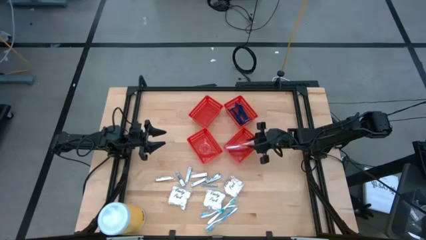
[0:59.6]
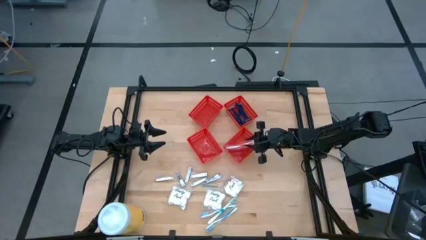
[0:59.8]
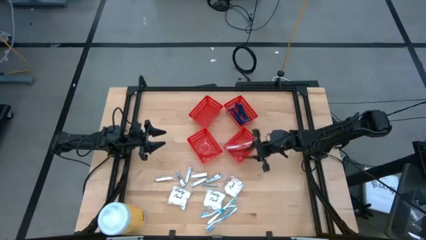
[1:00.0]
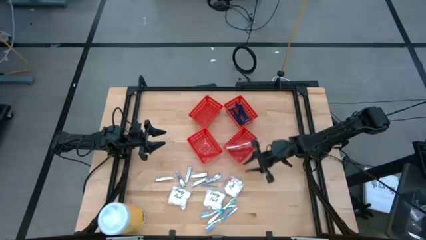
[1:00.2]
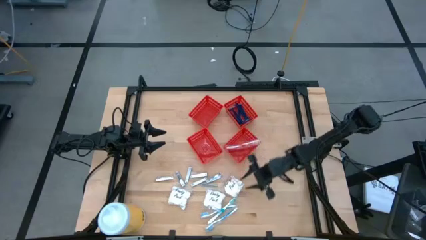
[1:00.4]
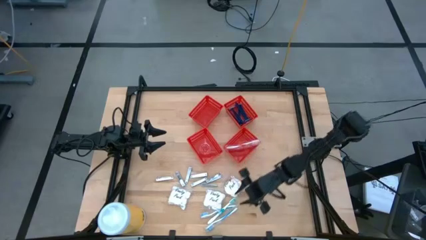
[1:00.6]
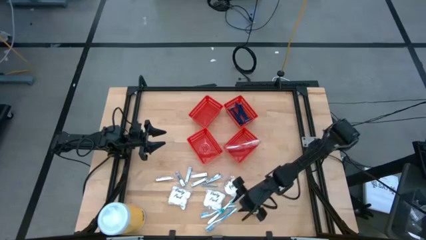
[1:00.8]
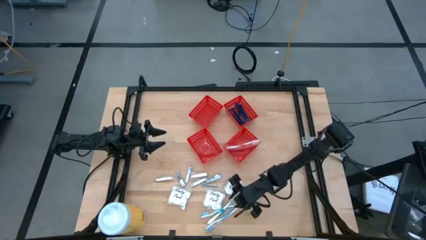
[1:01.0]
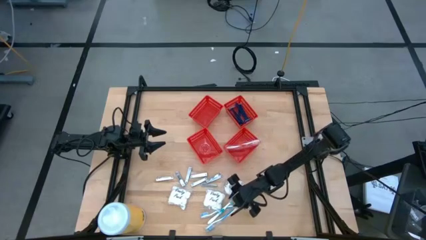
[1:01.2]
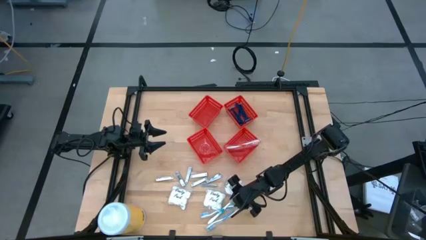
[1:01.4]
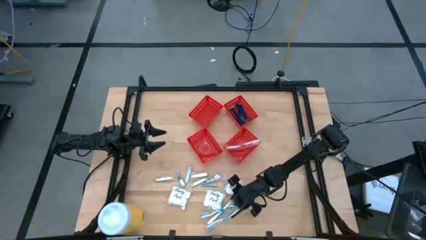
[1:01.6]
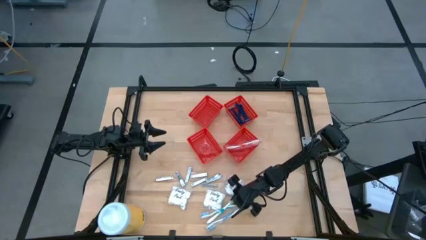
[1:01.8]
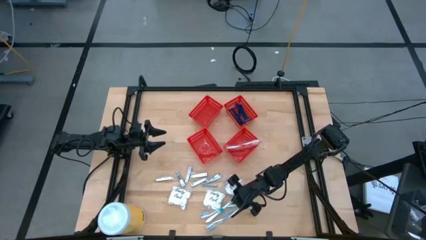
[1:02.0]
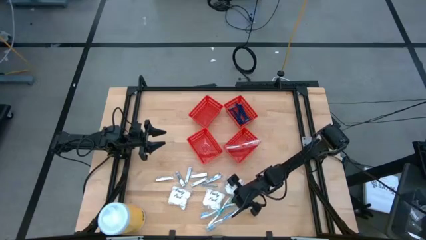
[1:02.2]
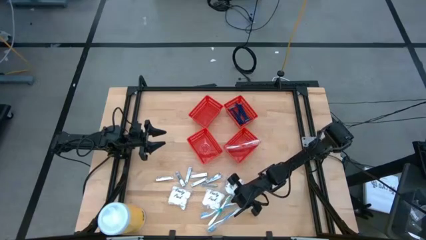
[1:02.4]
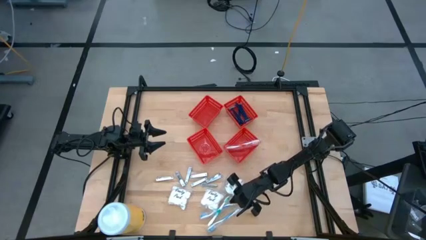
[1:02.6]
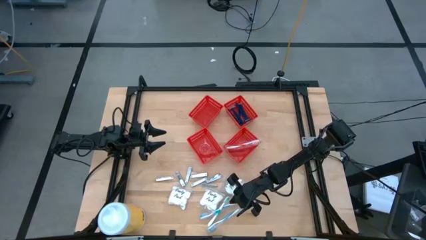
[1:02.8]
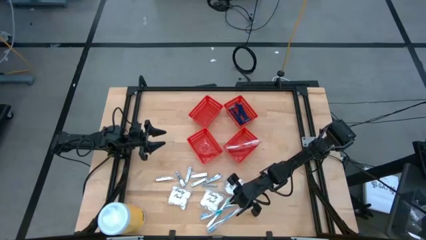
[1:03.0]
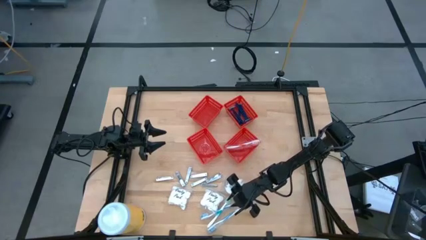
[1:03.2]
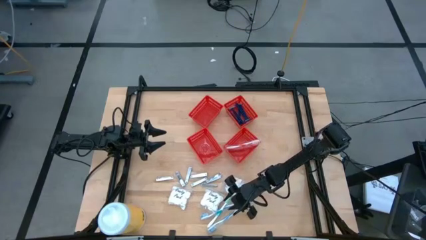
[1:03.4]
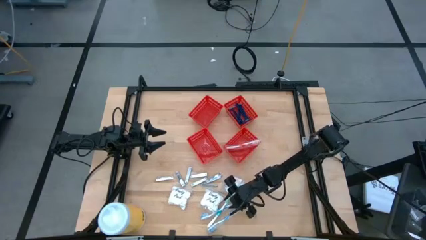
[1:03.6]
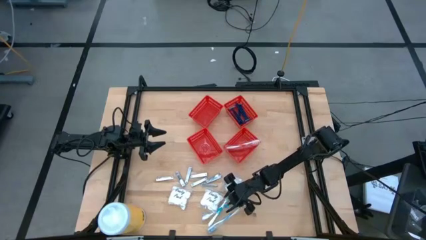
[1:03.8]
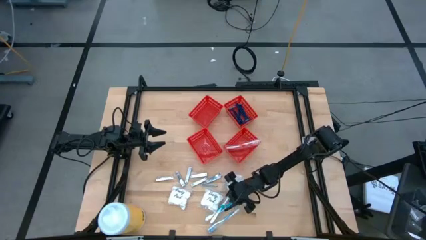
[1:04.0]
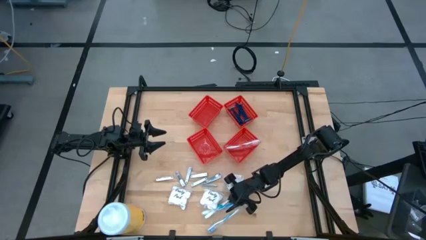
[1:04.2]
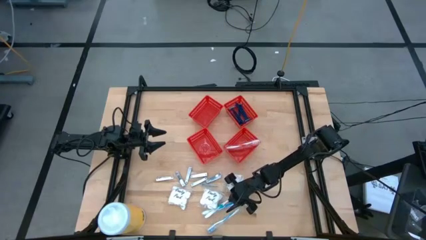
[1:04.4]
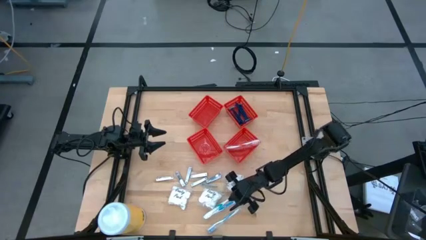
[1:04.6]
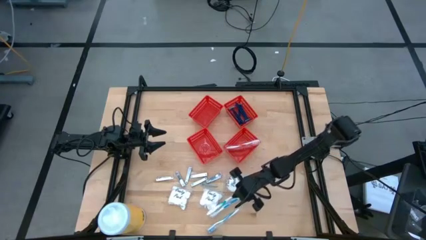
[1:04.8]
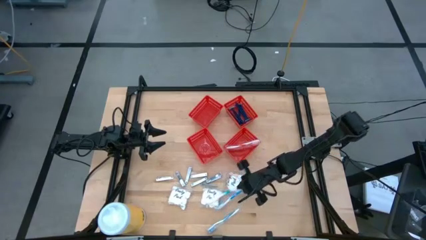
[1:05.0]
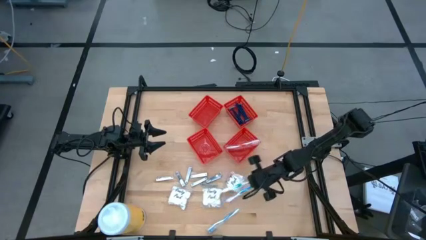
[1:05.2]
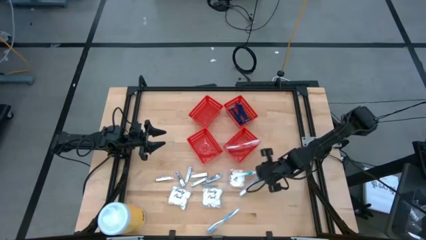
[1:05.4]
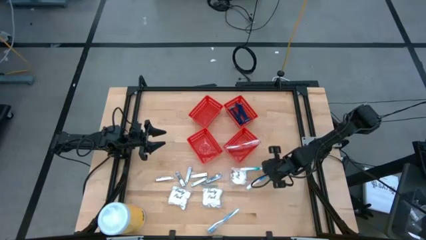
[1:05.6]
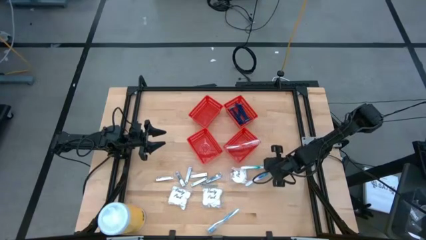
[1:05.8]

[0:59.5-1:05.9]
Task: Pick & Place Travel size toiletries
Put the green toothbrush into the bottom right red bin

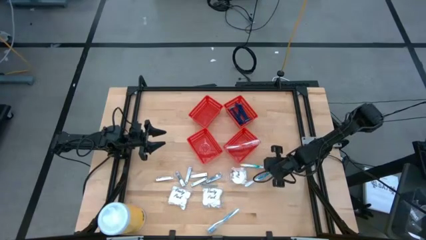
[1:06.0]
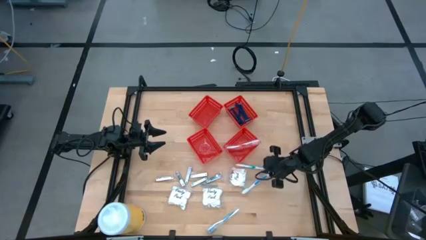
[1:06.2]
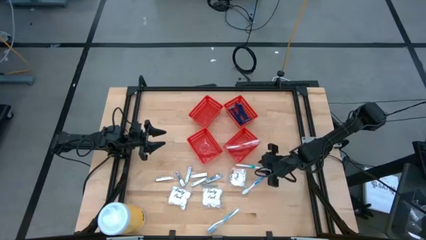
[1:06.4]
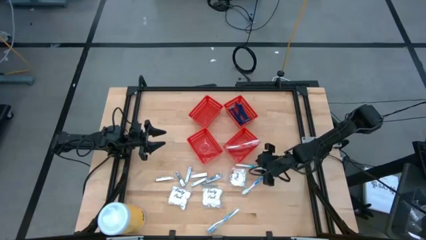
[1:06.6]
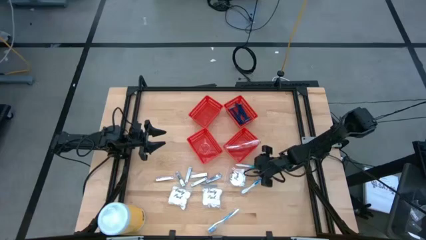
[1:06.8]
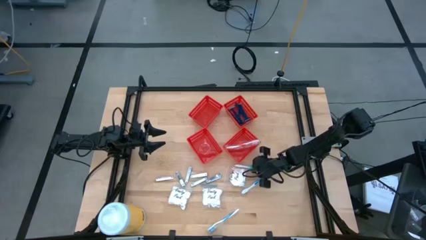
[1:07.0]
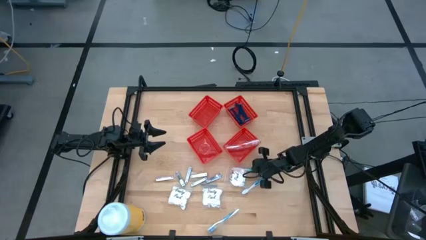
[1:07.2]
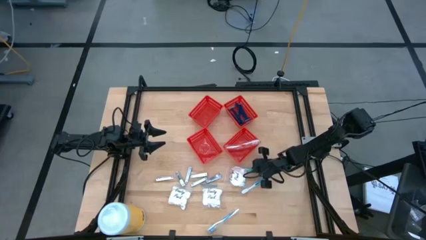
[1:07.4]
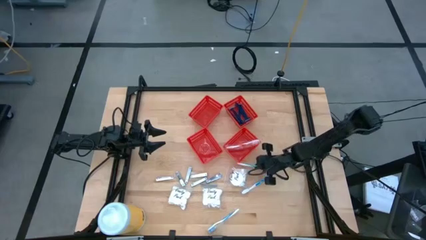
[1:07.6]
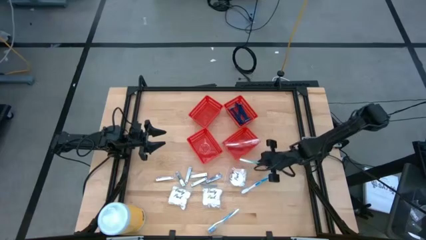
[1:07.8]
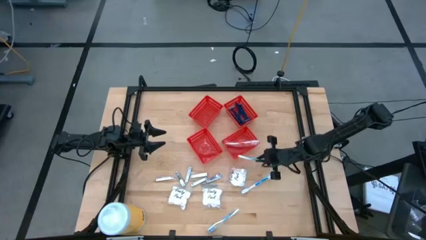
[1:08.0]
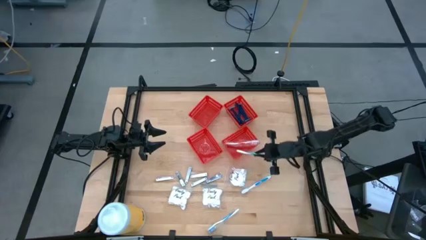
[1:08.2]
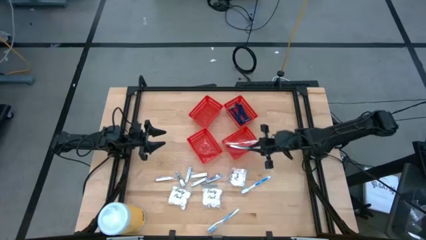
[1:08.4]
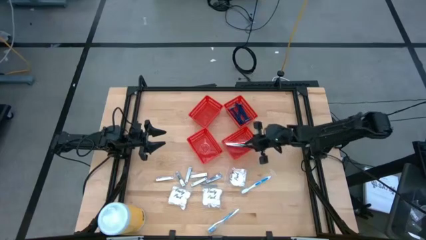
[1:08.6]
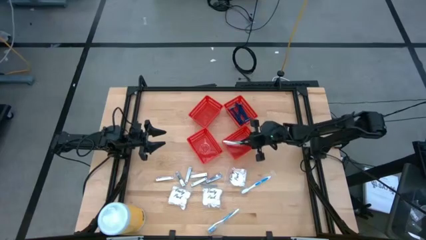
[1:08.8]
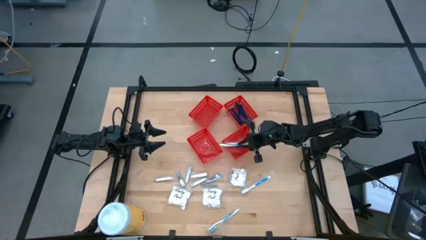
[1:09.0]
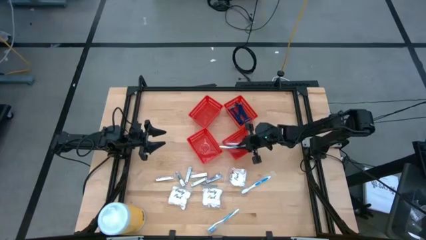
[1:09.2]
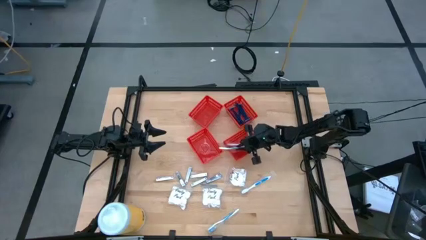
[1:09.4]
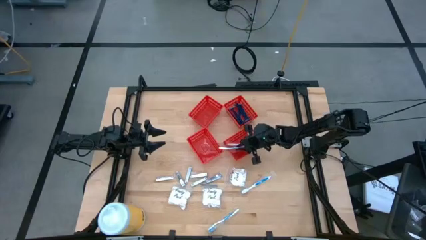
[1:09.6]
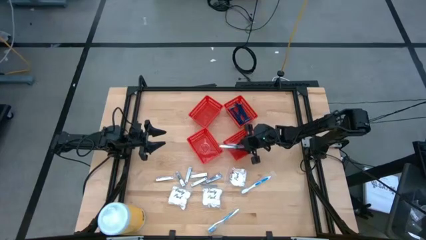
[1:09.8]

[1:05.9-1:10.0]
Put the green toothbrush into the bottom right red bin

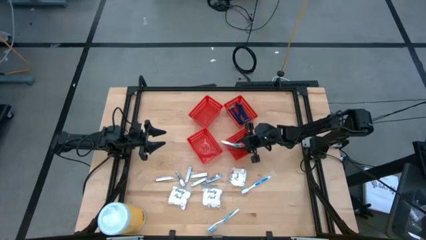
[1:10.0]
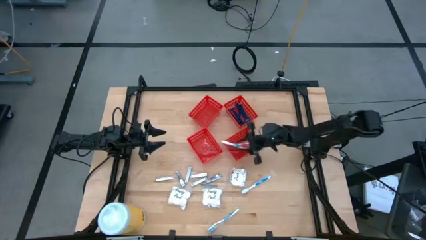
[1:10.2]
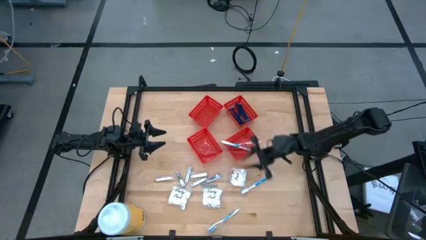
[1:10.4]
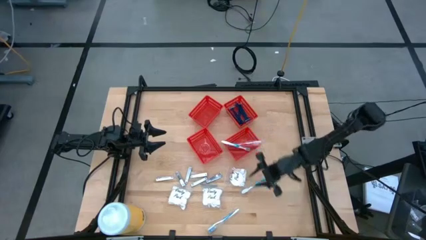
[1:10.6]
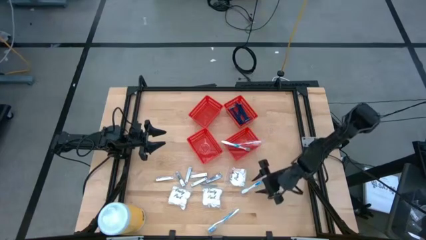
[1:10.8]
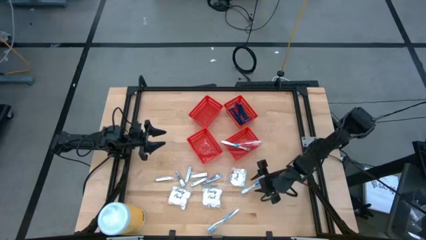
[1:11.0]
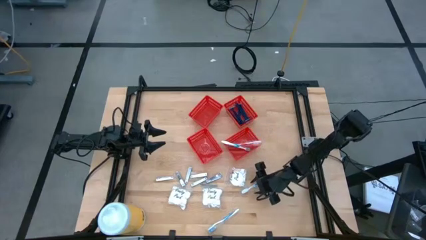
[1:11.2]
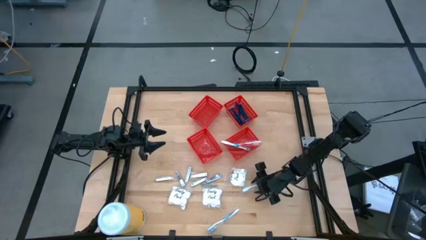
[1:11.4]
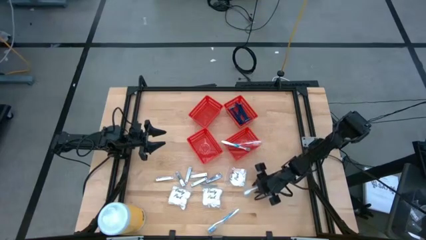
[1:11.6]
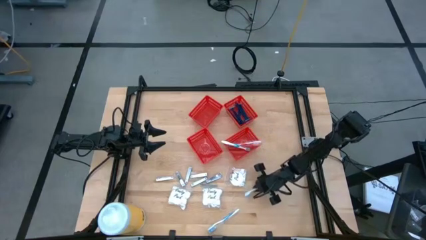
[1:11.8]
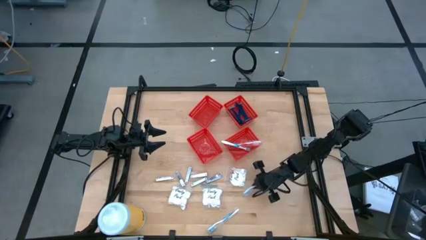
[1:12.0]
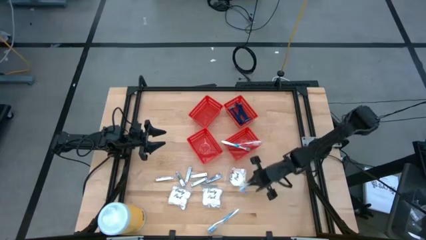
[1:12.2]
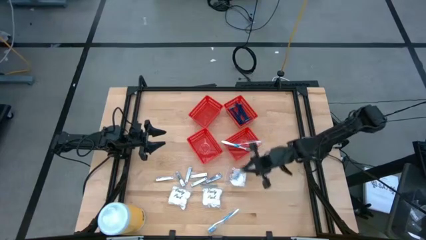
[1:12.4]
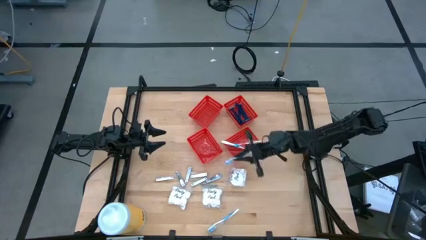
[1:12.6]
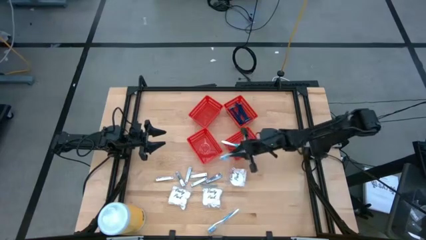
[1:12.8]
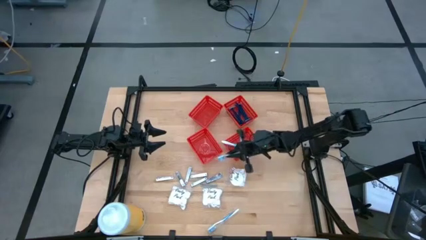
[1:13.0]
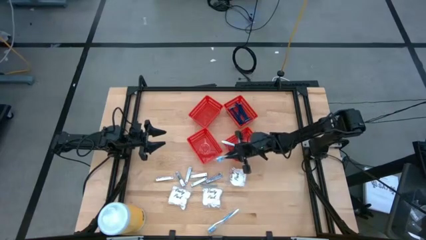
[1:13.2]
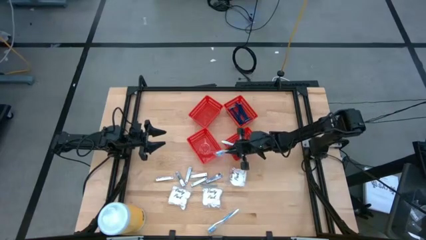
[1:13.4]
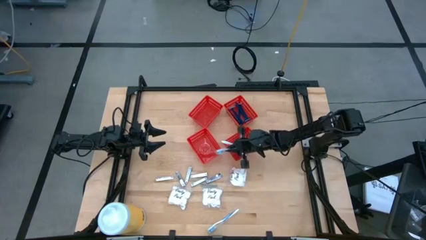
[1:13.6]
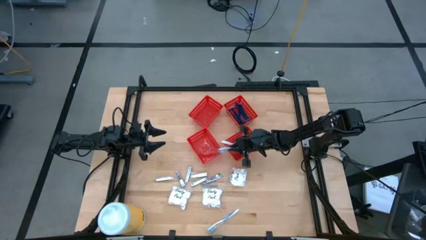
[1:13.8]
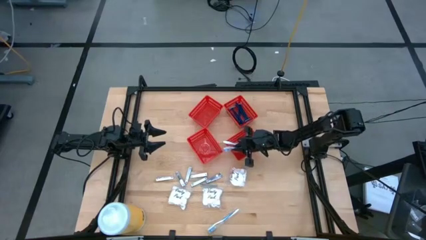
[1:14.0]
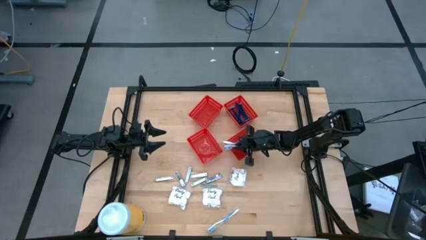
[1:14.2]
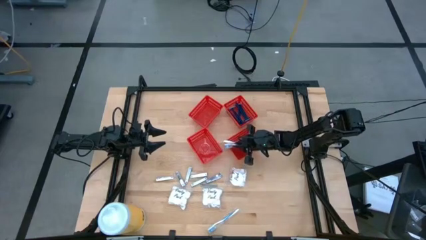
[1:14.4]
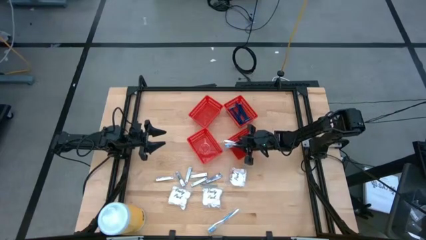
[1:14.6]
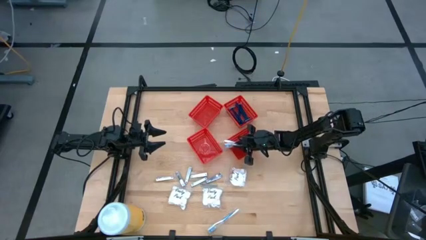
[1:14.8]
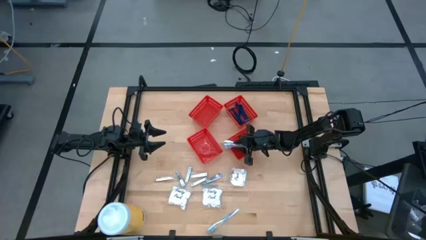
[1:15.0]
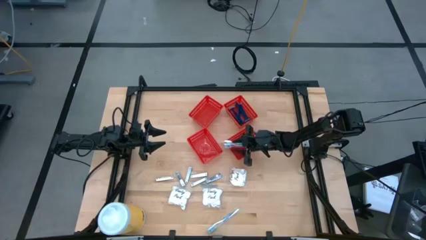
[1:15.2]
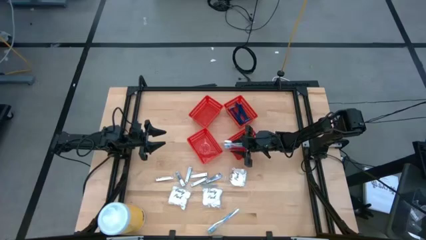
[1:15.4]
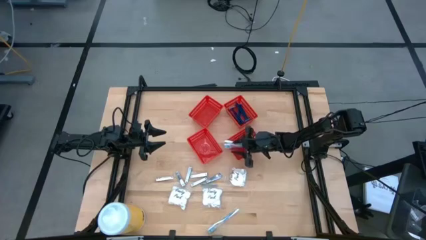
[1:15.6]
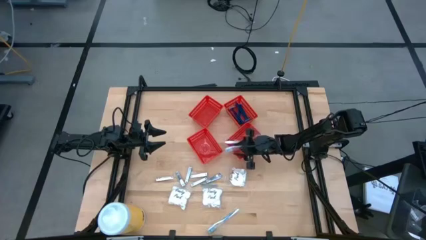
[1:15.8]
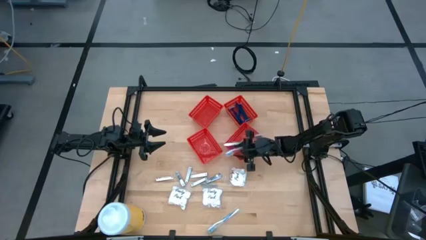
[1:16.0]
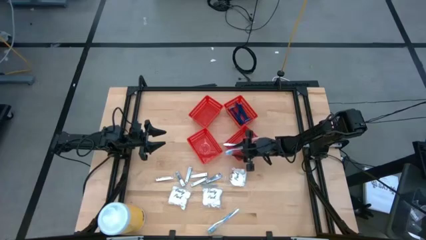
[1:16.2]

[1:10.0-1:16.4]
Put the blue toothbrush into the bottom right red bin
